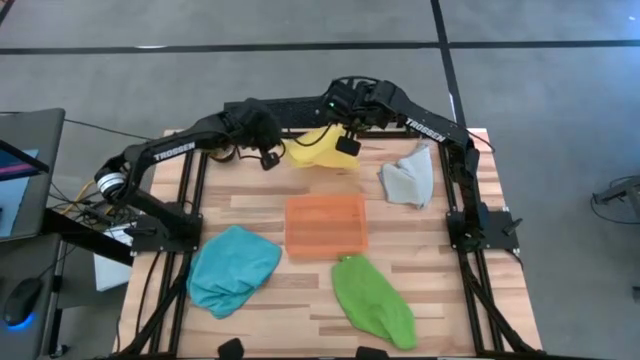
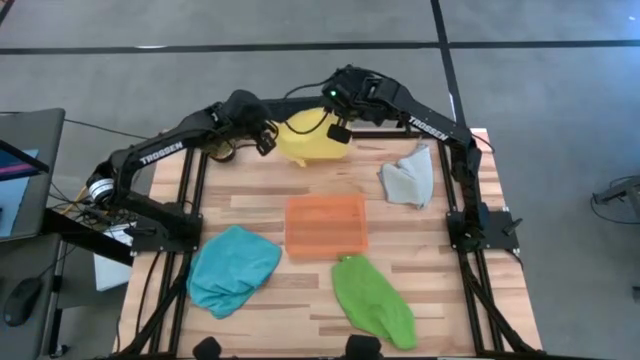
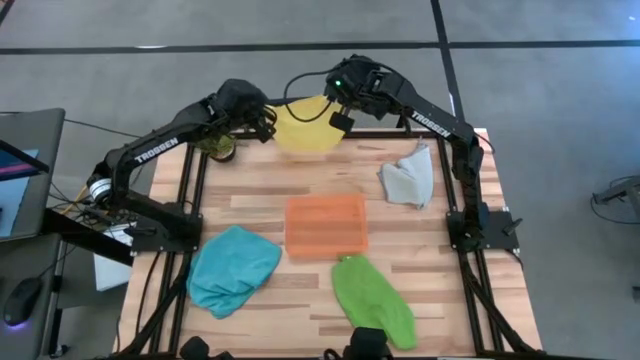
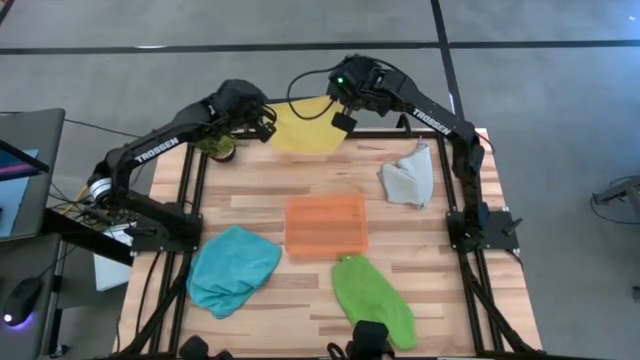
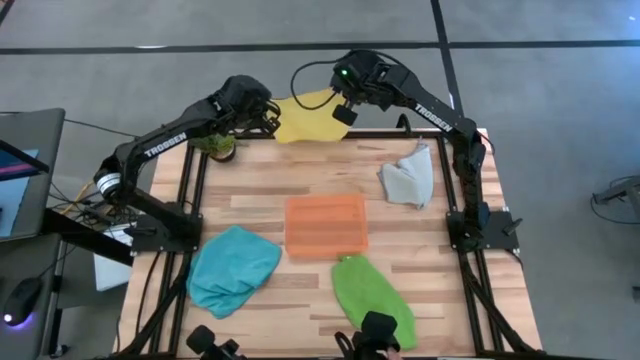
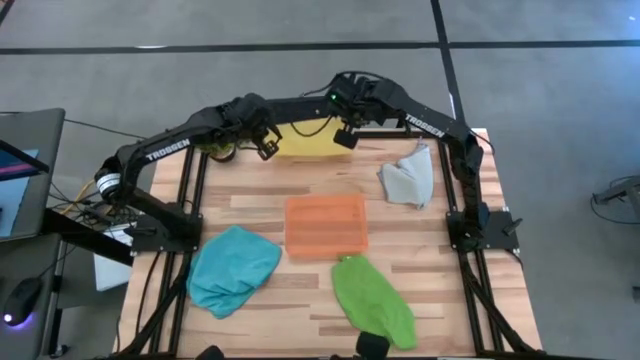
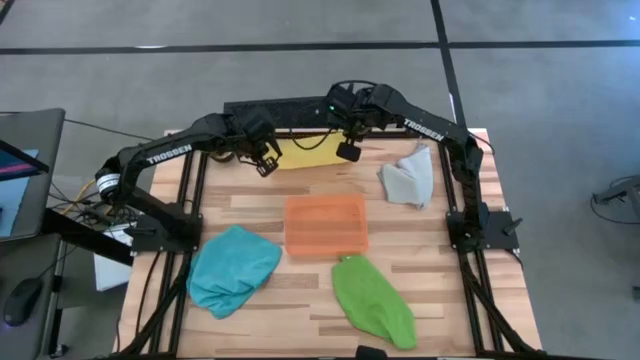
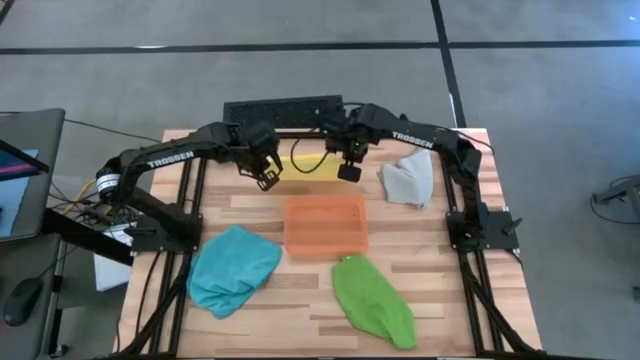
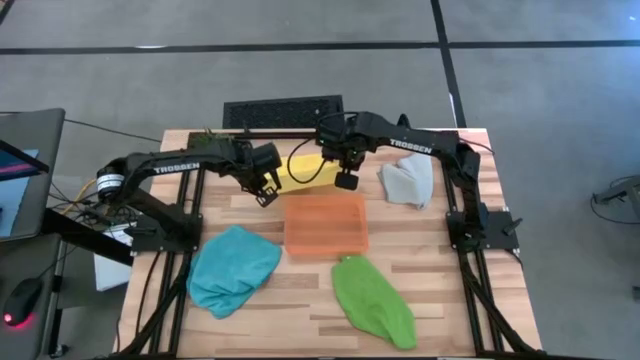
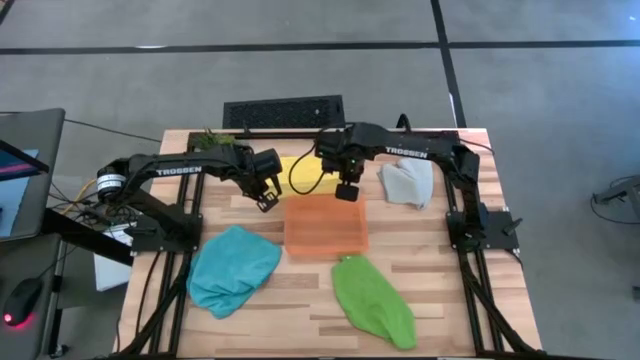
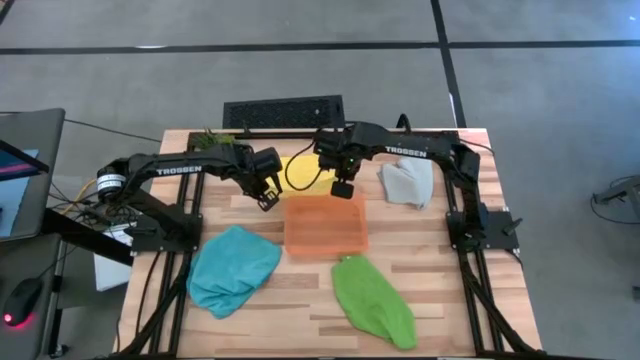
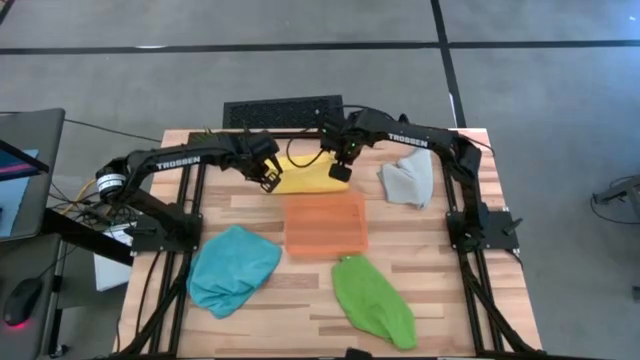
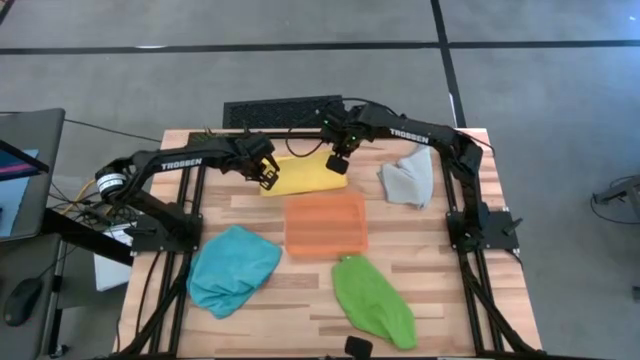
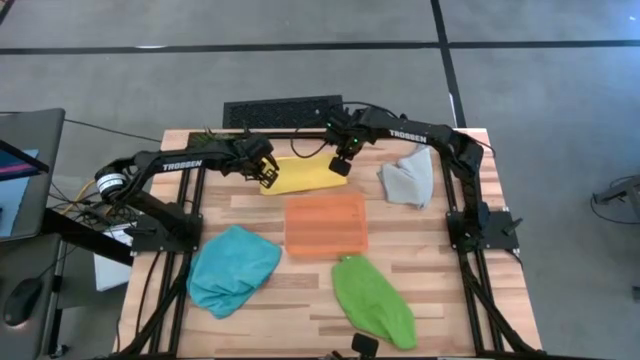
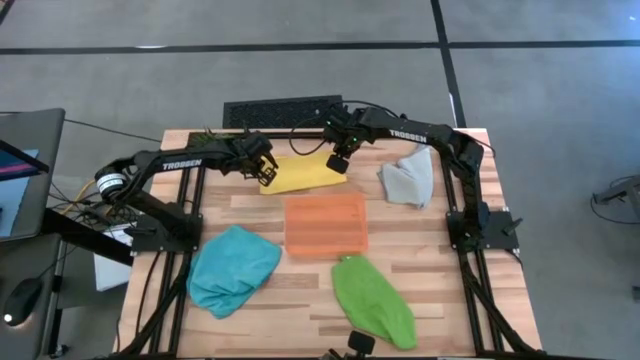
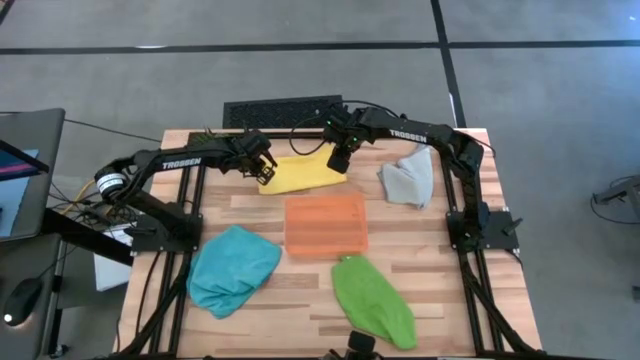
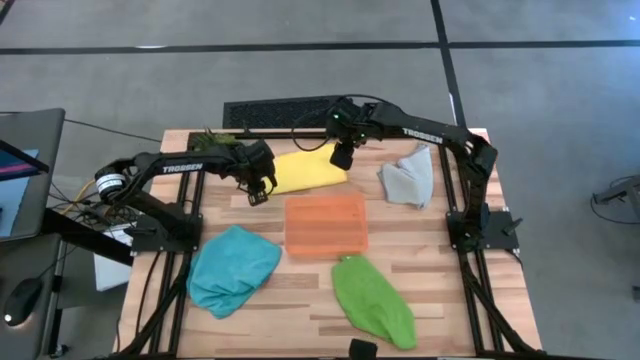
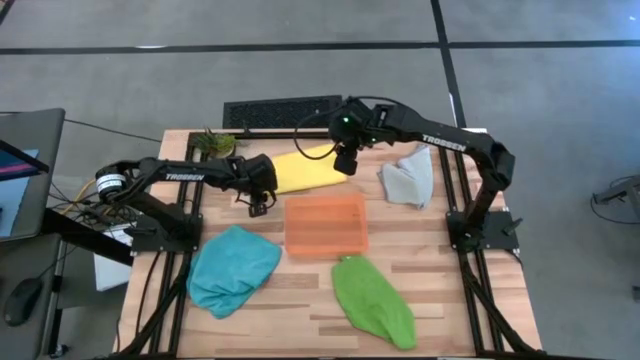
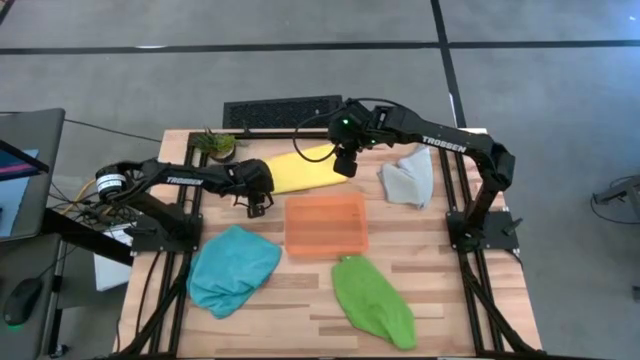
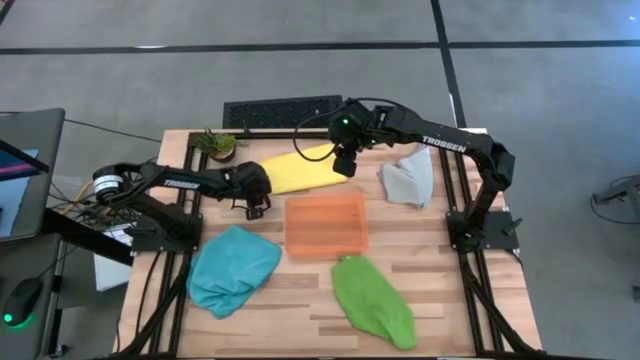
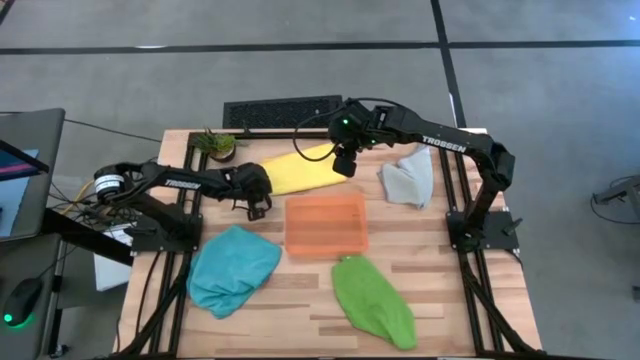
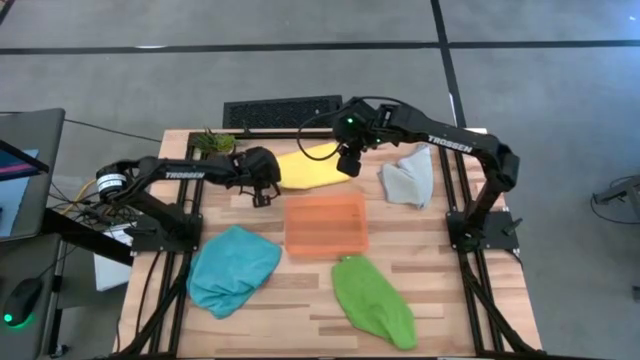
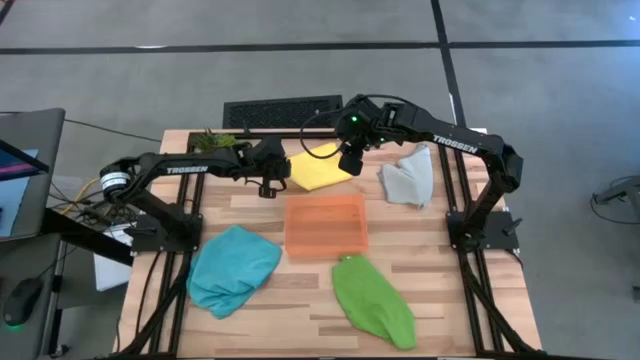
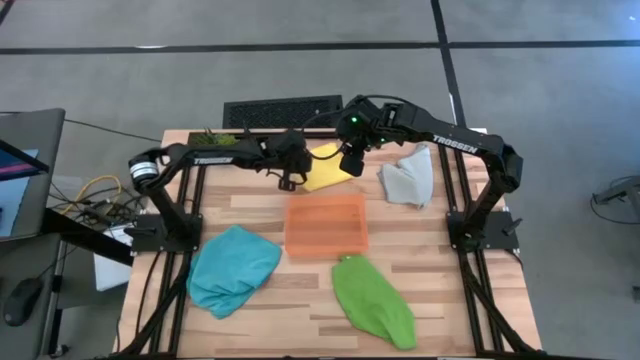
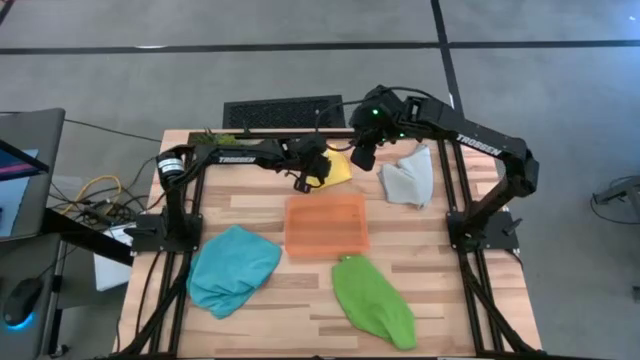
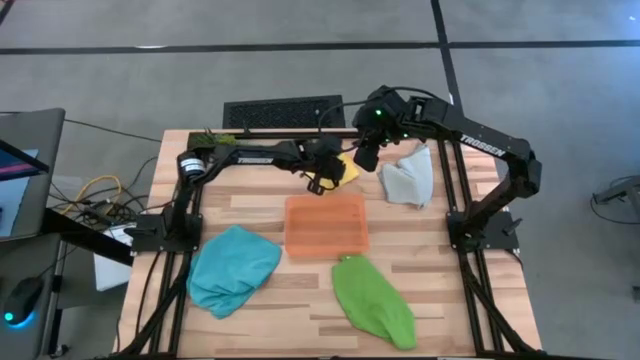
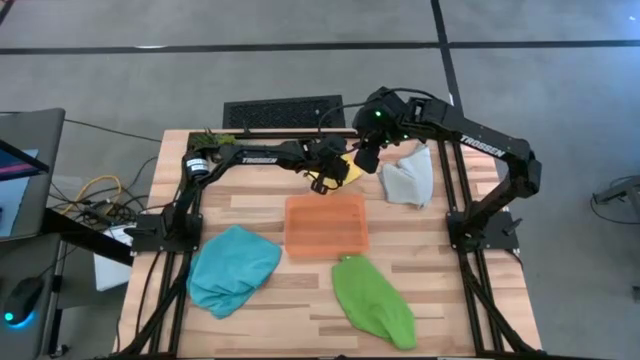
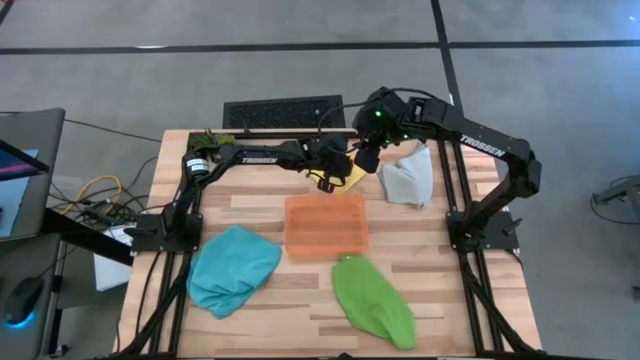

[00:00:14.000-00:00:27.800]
Task: Sort microfiber towel by color & place in baskets
Fold the yellow towel
